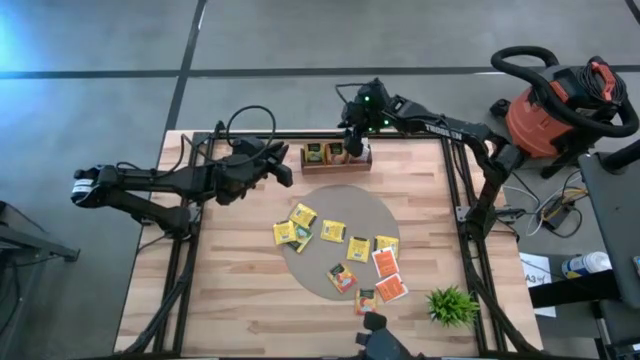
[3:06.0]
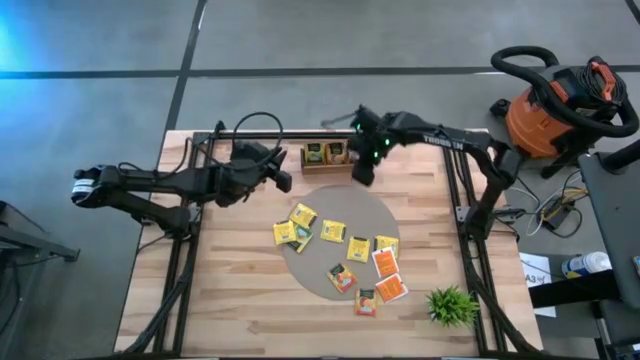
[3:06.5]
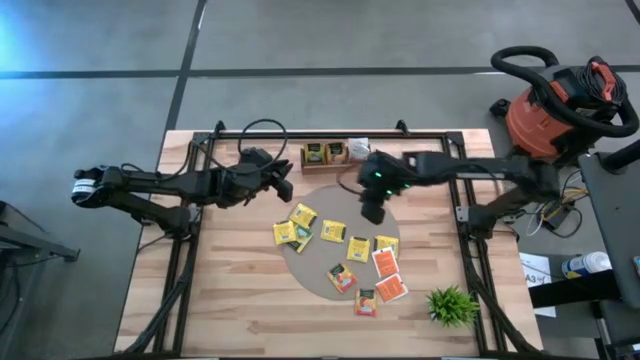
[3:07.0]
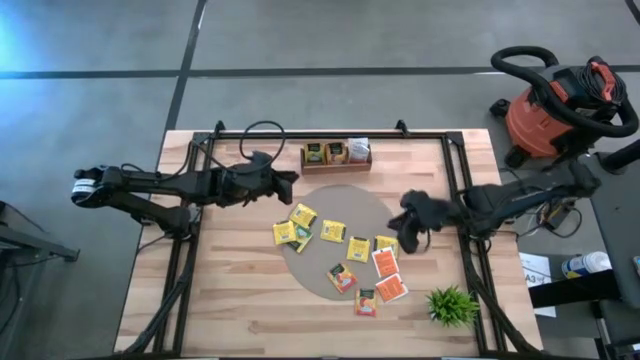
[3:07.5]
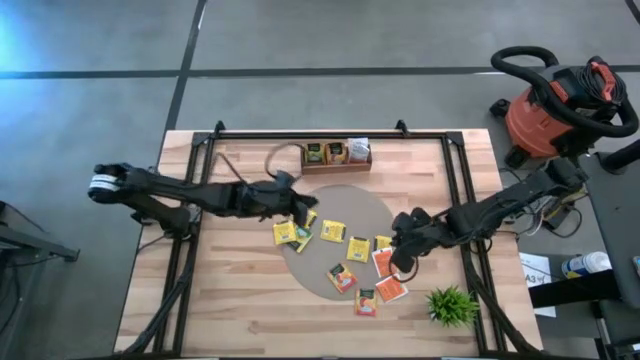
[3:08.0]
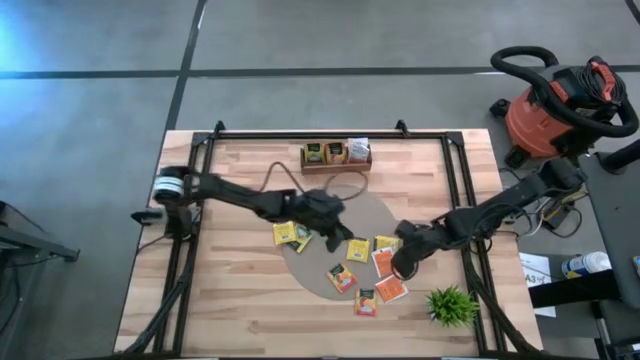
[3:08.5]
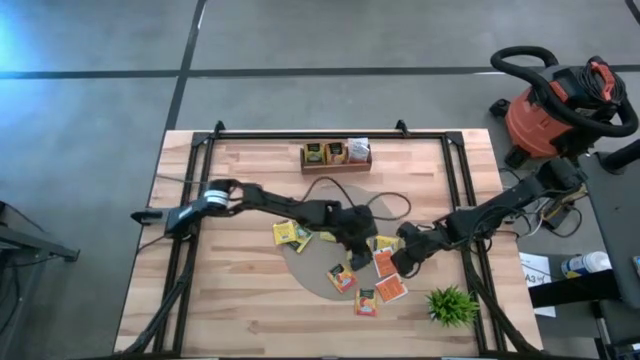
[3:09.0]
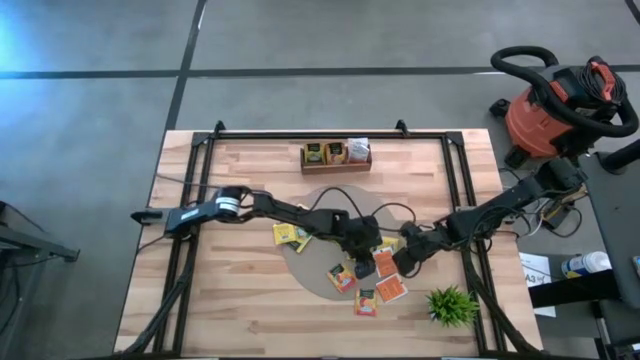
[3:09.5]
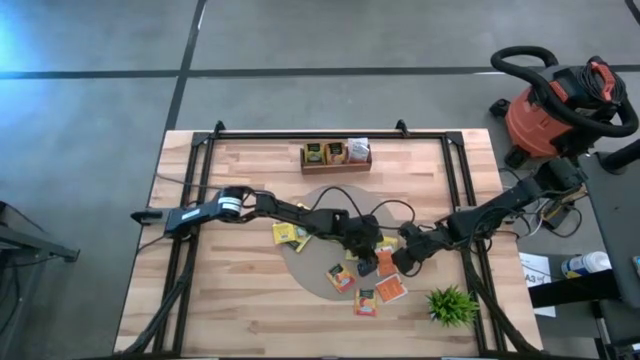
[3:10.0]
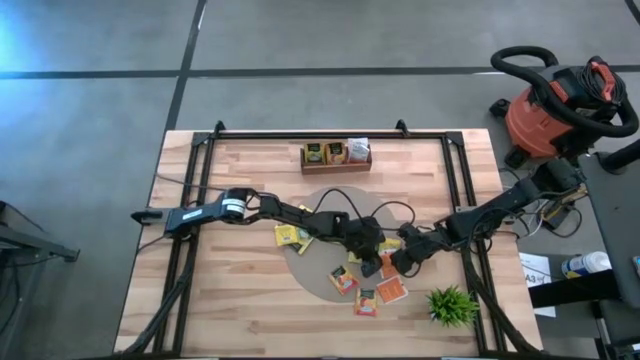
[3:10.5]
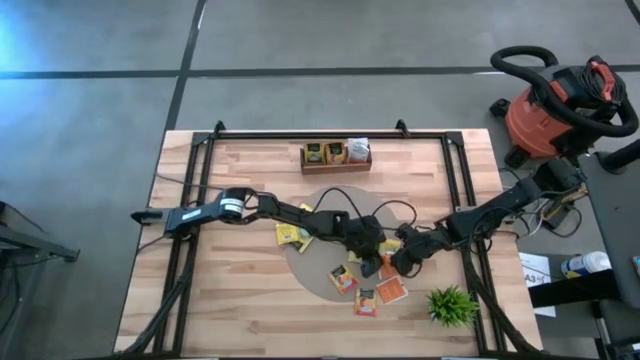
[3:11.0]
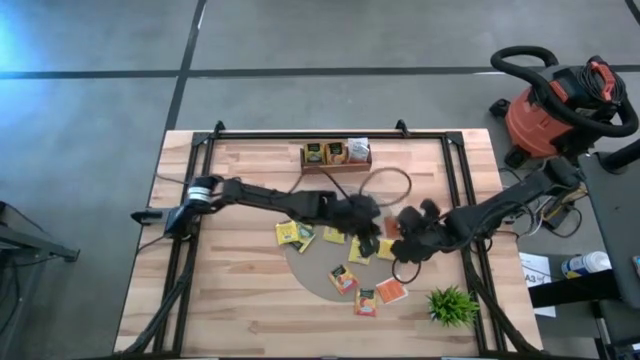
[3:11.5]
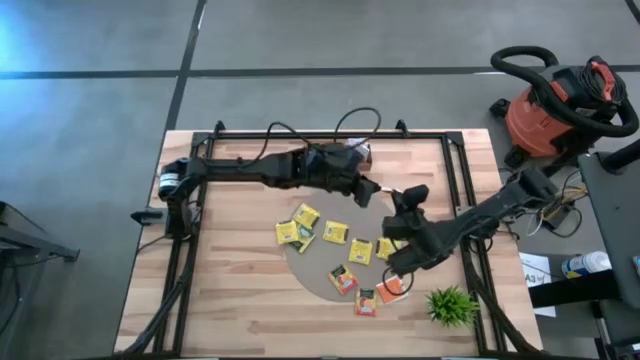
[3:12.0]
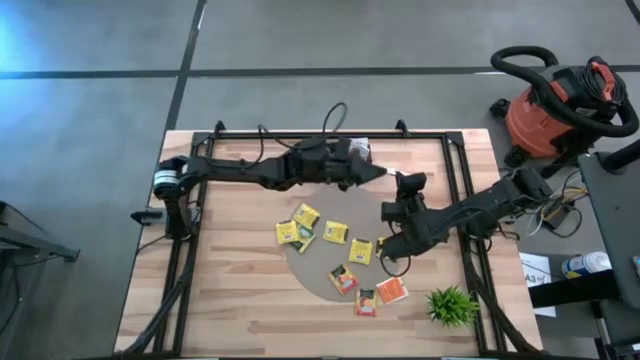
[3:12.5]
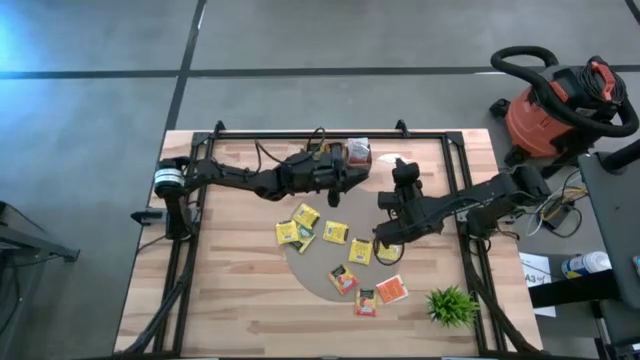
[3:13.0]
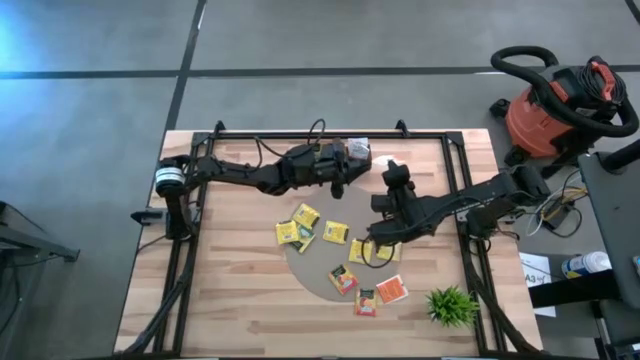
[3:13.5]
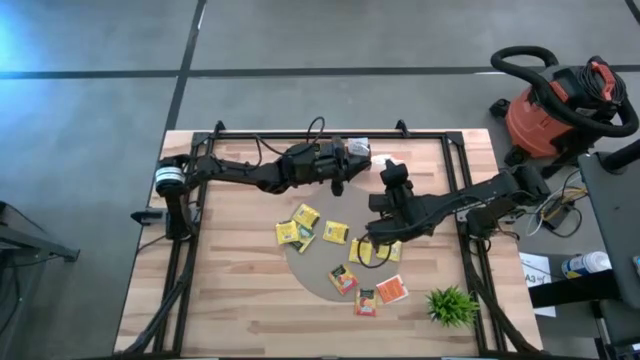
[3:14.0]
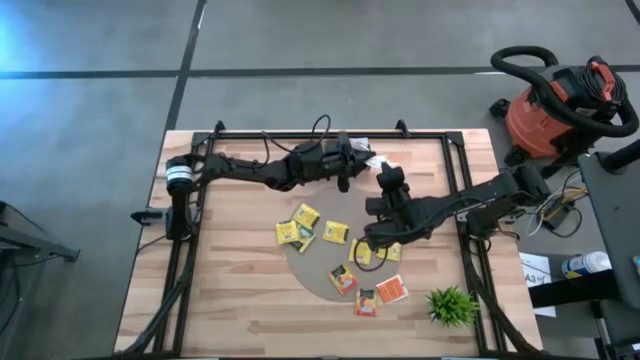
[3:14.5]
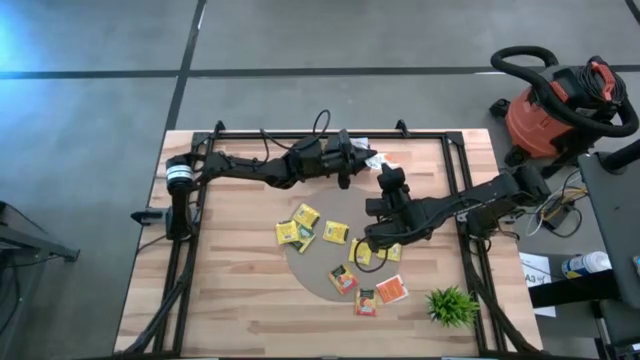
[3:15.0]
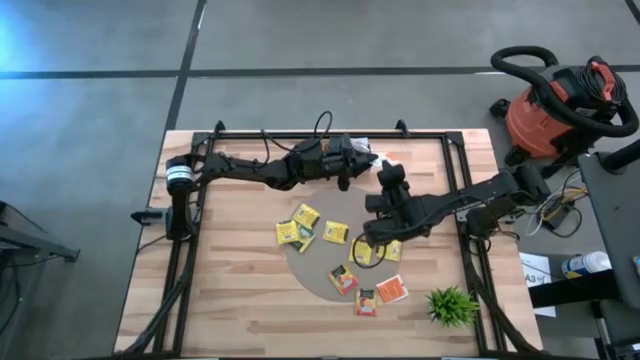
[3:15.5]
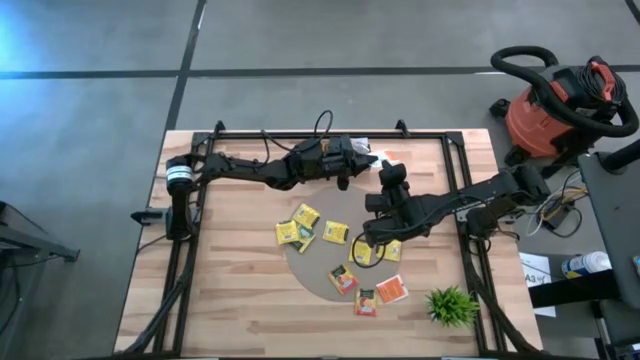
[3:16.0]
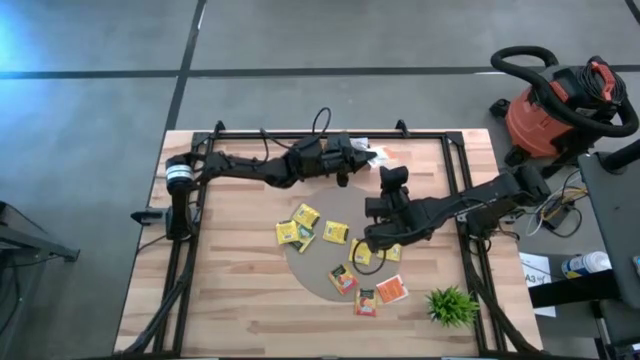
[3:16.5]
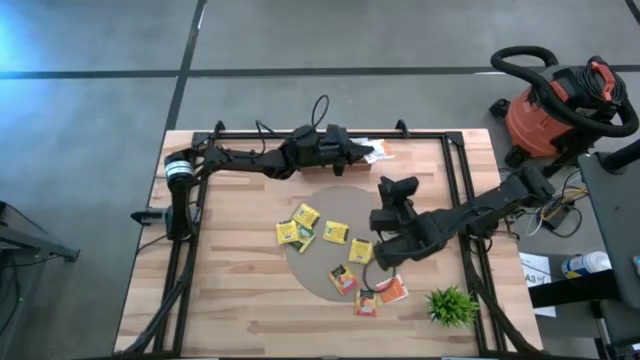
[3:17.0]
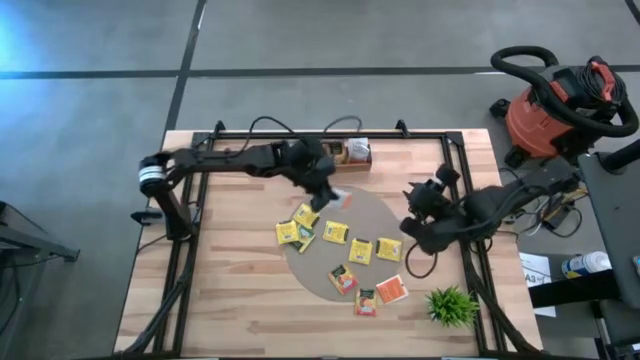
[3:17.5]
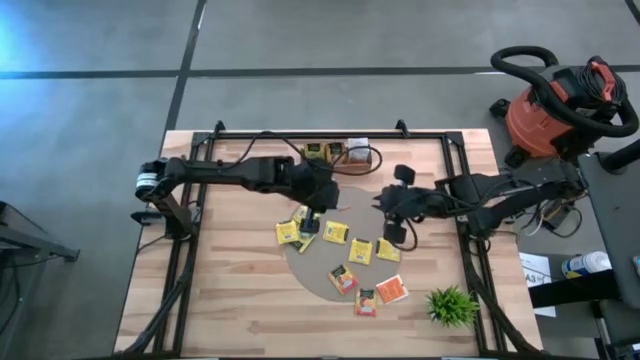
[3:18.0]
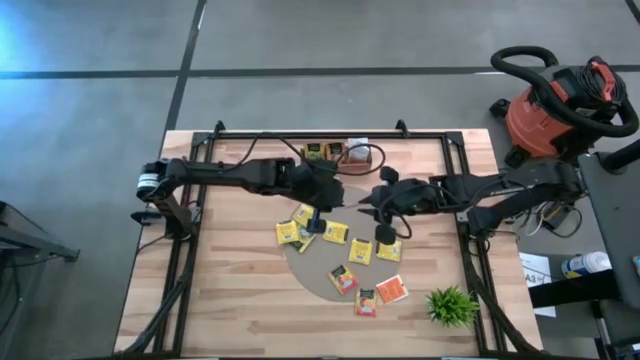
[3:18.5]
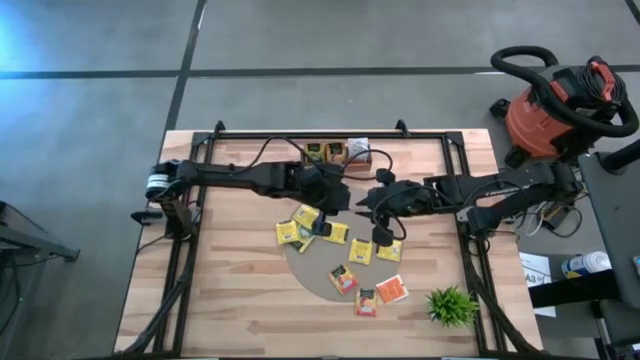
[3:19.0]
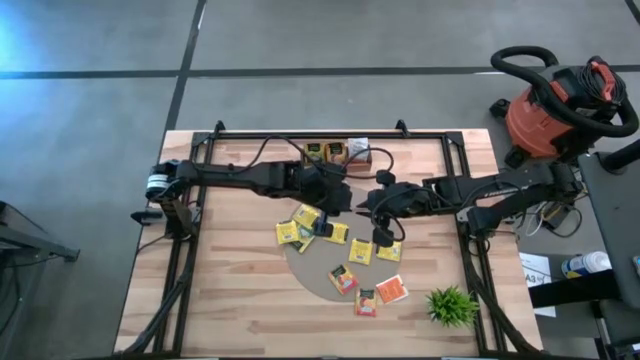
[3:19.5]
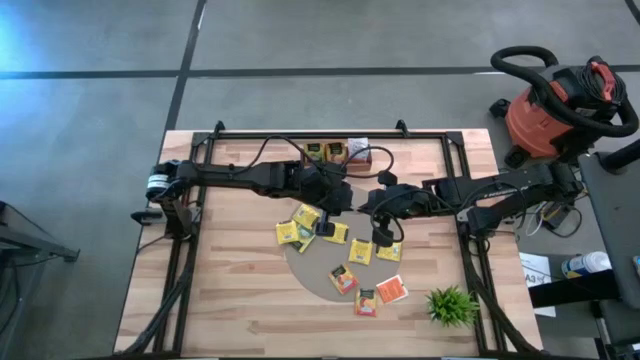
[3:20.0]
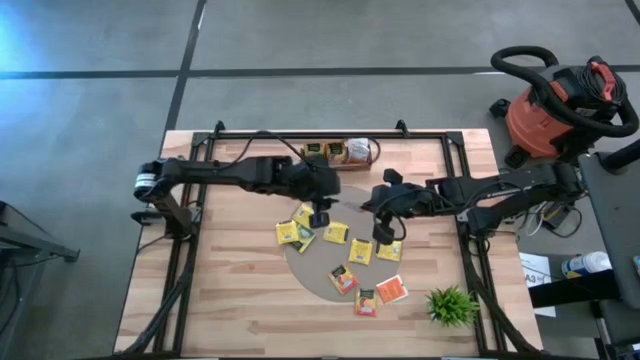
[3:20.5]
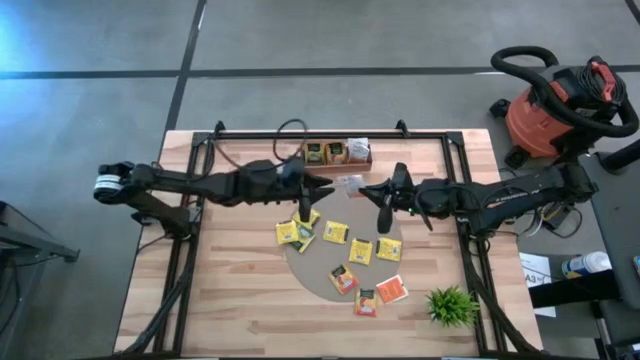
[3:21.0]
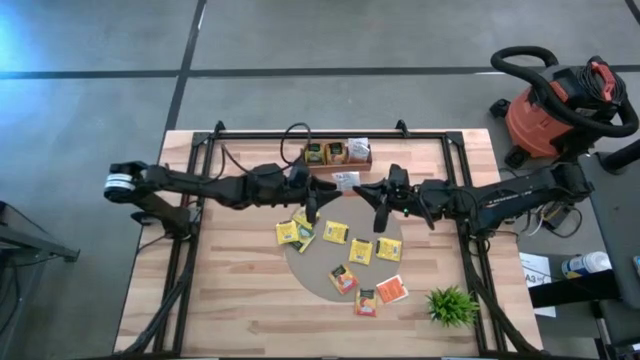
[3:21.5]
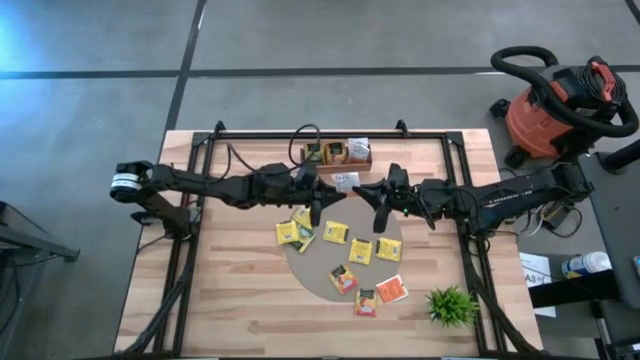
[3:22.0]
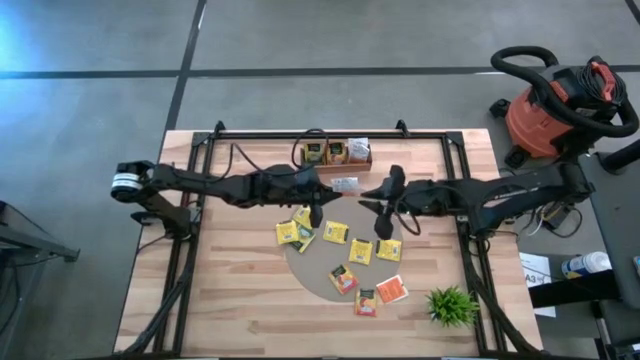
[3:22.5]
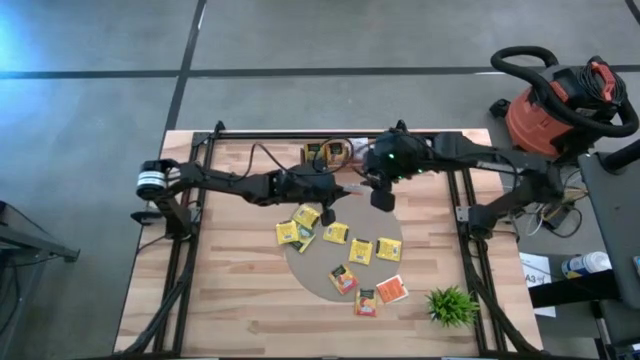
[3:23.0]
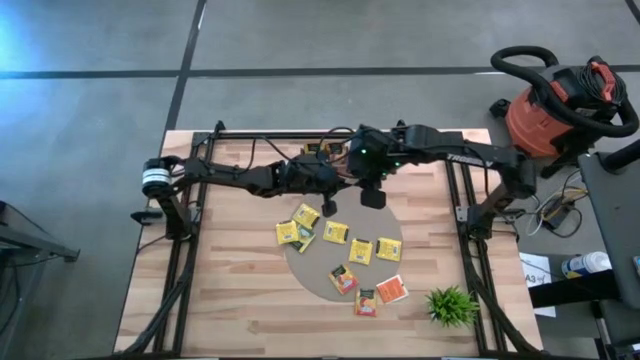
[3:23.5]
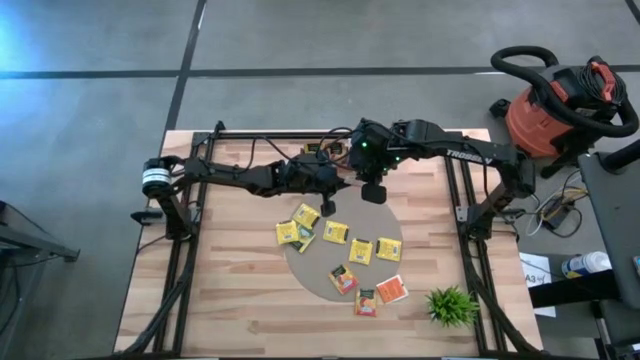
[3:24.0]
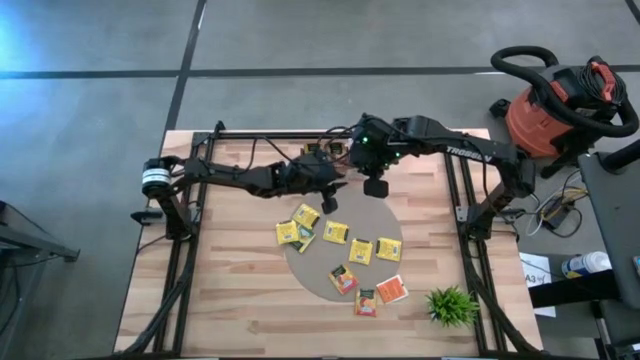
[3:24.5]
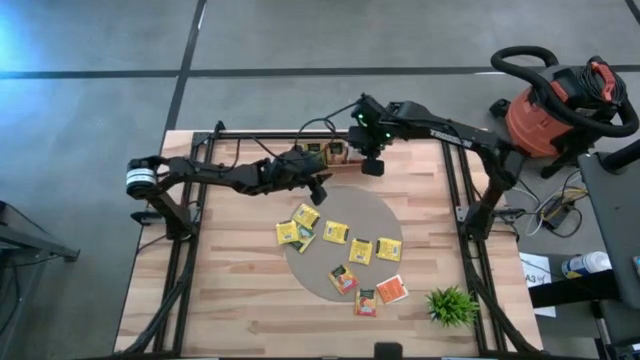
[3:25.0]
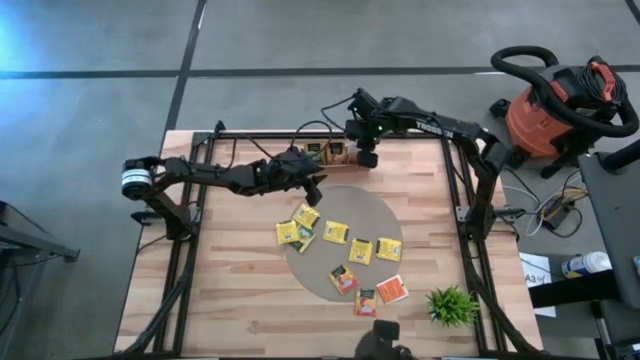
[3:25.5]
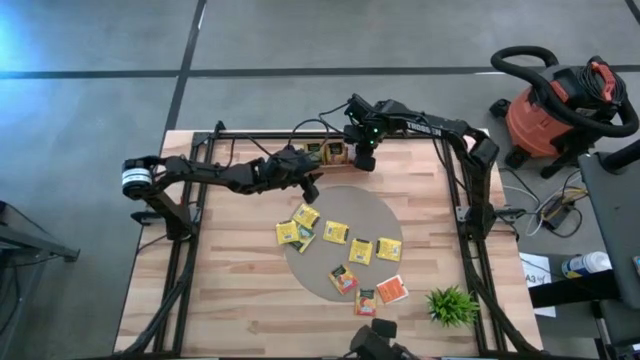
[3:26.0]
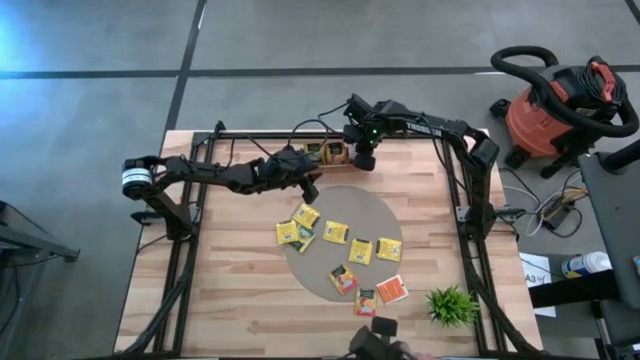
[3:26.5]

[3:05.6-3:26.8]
Task: Pick & Place Tea
Put the top white tea bag into the right compartment of the wooden organizer
